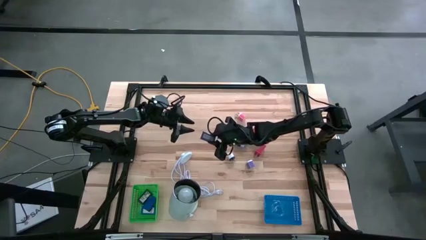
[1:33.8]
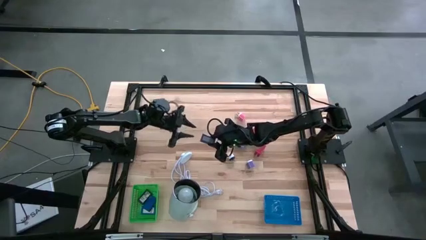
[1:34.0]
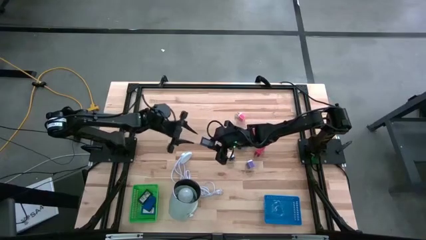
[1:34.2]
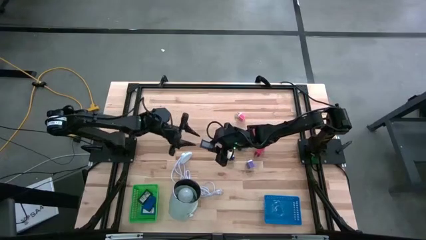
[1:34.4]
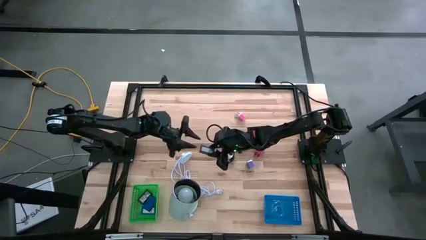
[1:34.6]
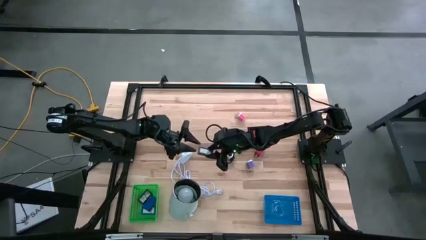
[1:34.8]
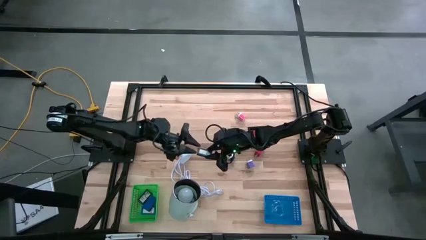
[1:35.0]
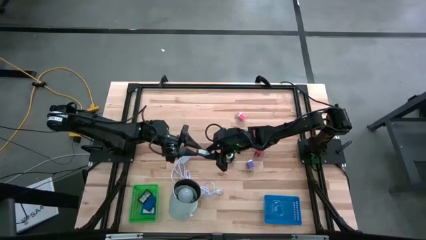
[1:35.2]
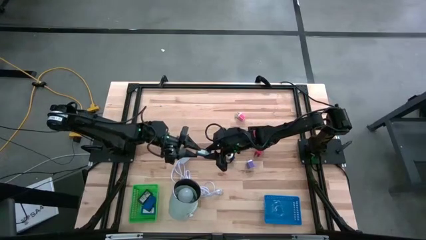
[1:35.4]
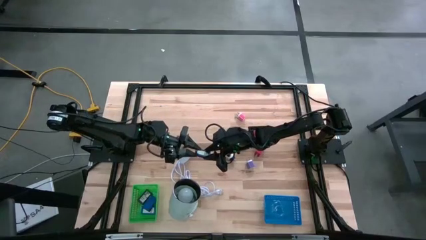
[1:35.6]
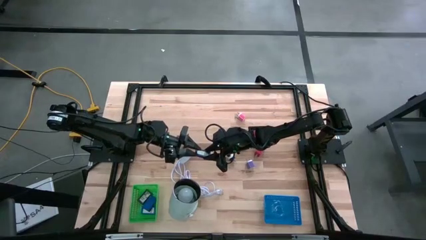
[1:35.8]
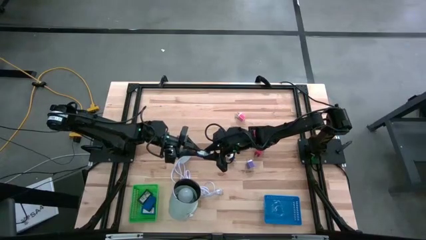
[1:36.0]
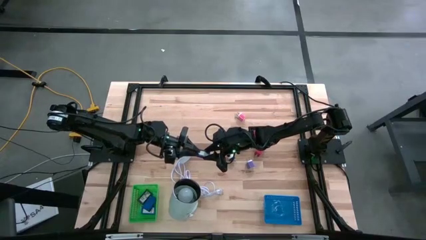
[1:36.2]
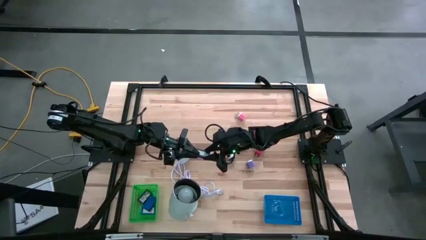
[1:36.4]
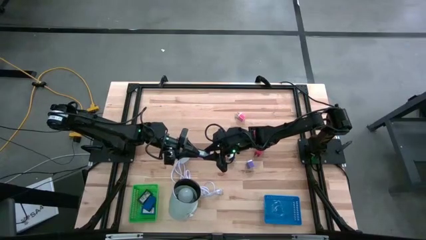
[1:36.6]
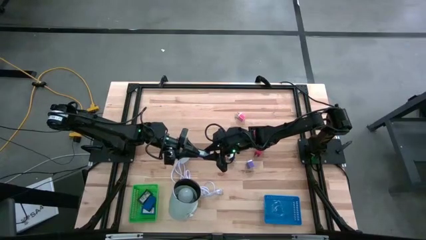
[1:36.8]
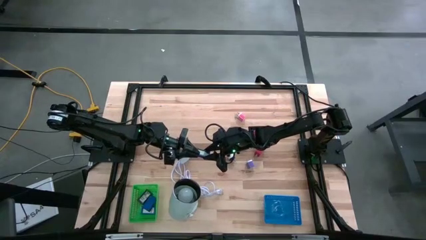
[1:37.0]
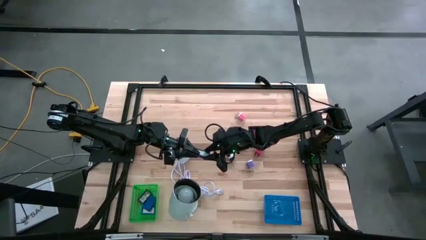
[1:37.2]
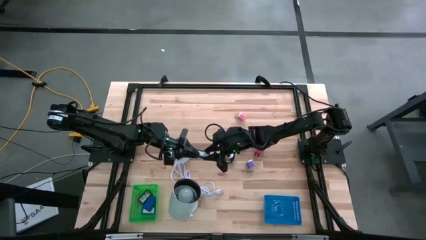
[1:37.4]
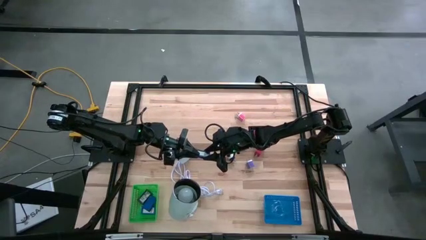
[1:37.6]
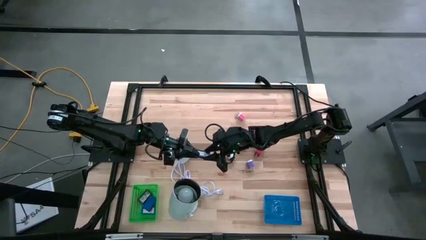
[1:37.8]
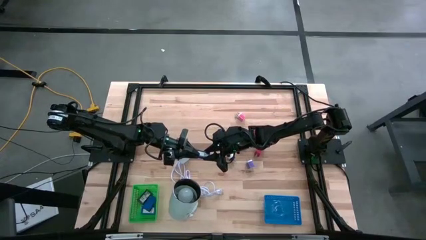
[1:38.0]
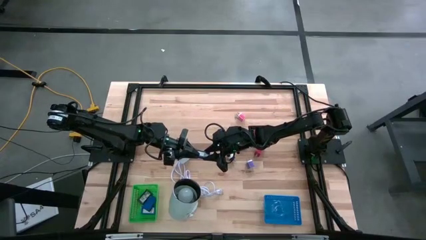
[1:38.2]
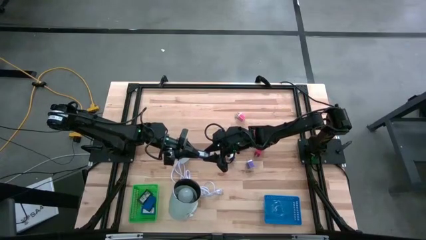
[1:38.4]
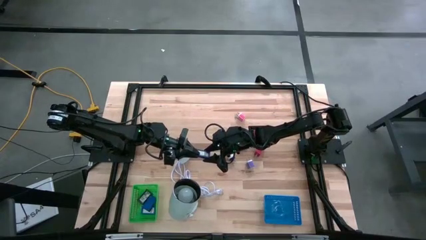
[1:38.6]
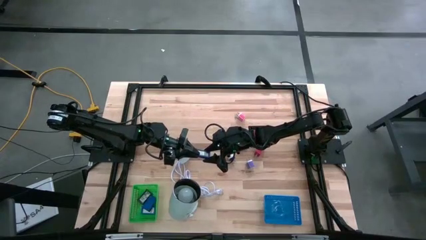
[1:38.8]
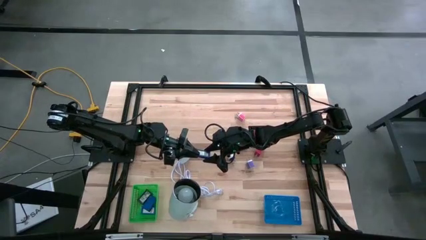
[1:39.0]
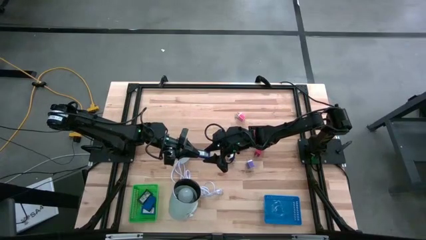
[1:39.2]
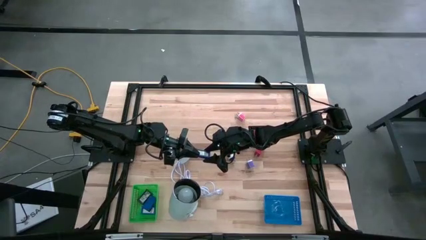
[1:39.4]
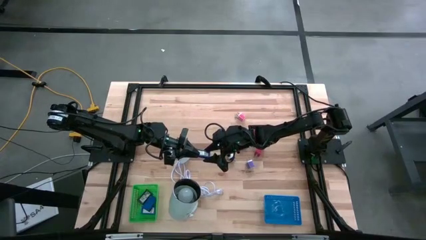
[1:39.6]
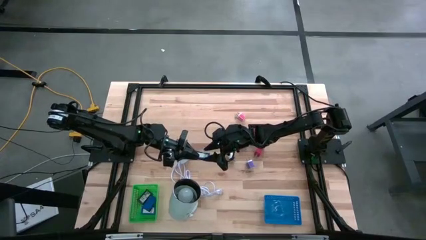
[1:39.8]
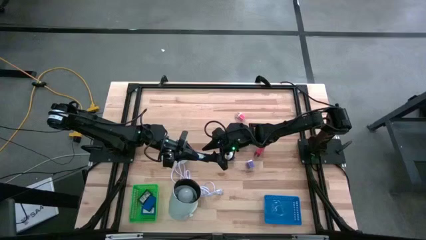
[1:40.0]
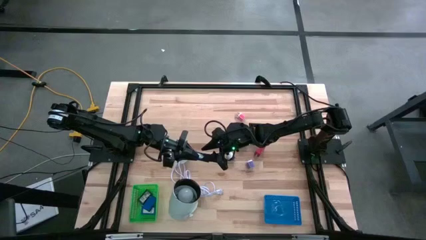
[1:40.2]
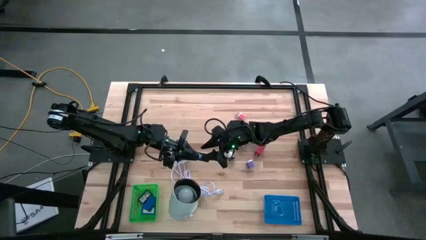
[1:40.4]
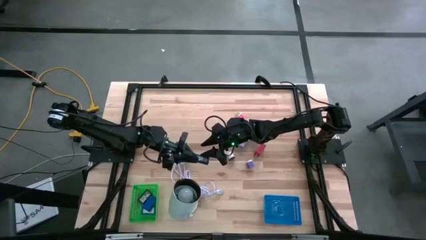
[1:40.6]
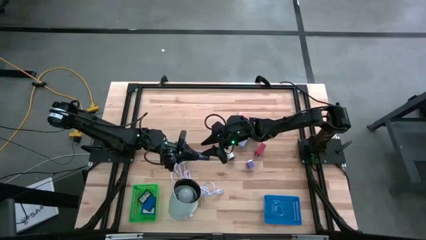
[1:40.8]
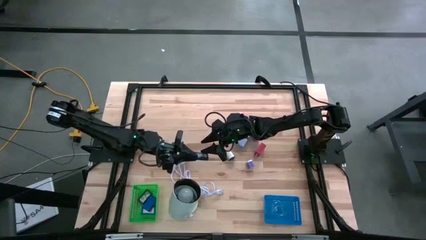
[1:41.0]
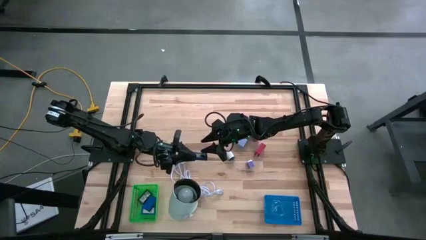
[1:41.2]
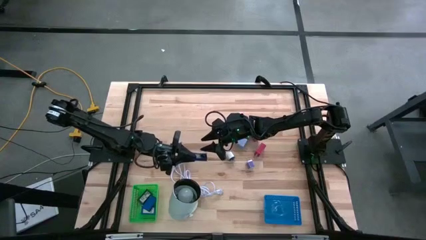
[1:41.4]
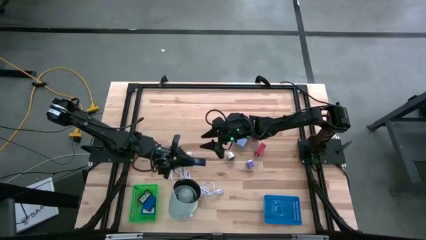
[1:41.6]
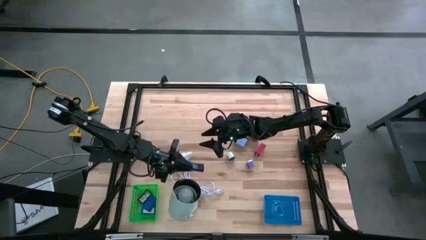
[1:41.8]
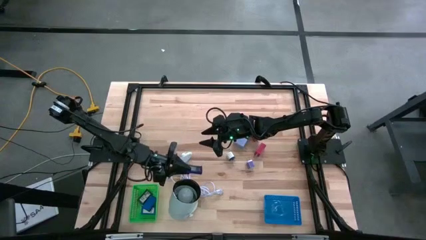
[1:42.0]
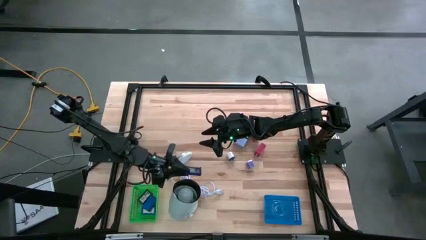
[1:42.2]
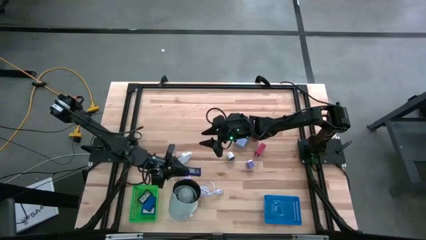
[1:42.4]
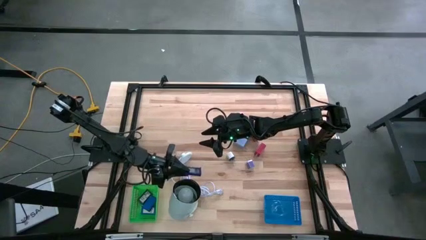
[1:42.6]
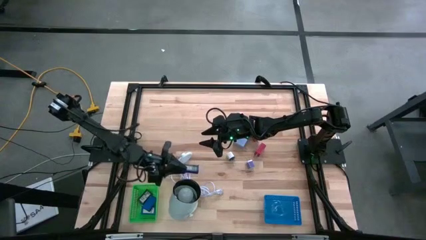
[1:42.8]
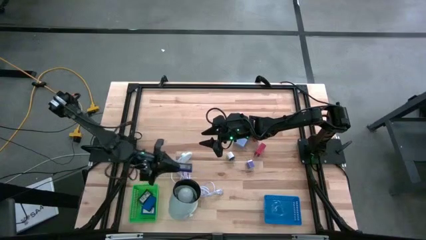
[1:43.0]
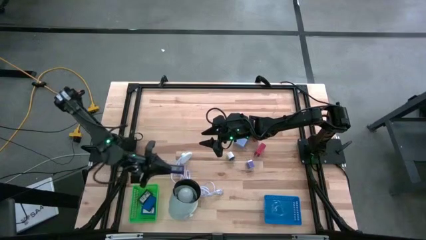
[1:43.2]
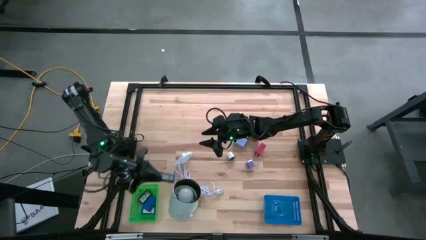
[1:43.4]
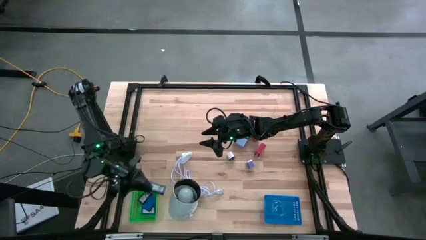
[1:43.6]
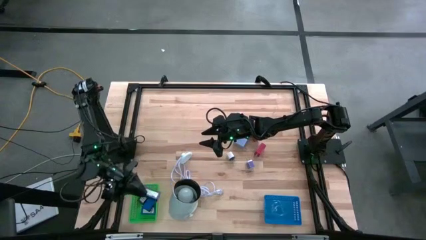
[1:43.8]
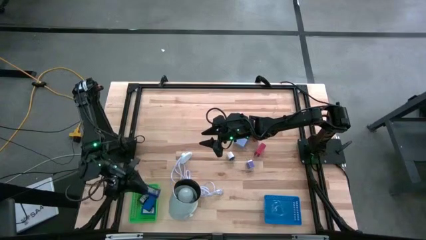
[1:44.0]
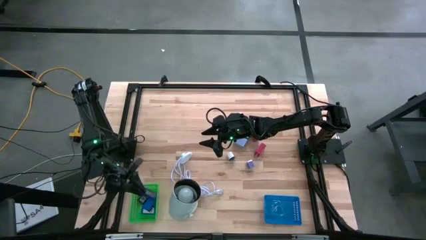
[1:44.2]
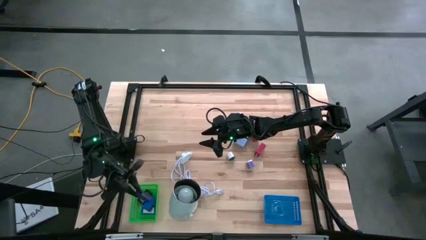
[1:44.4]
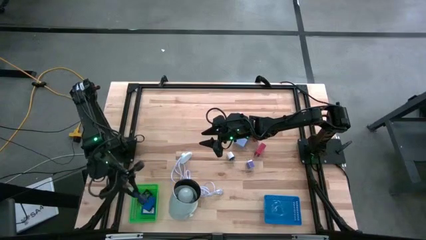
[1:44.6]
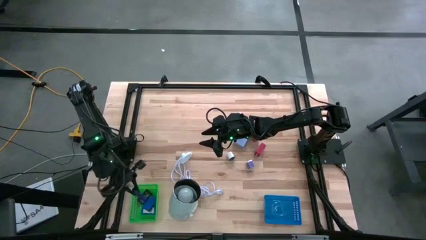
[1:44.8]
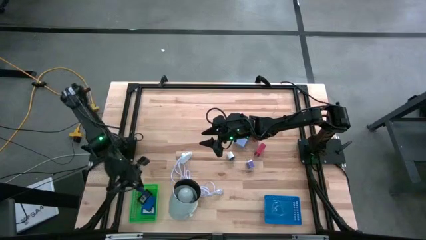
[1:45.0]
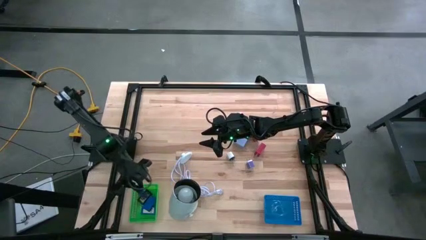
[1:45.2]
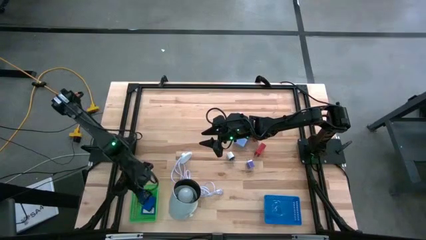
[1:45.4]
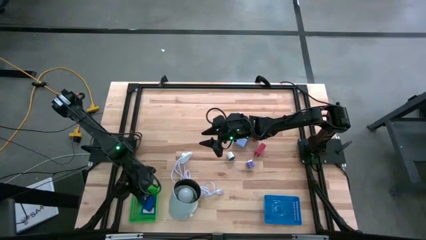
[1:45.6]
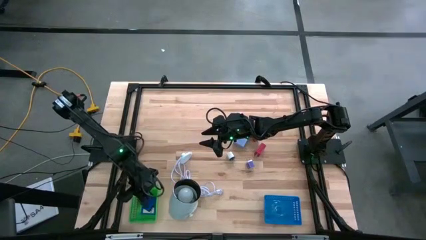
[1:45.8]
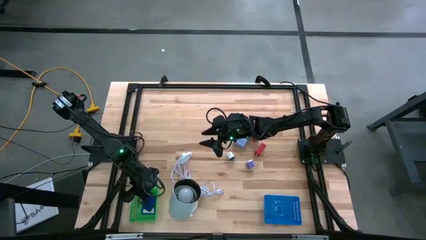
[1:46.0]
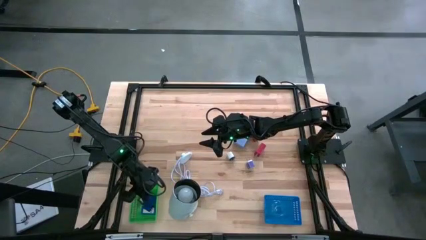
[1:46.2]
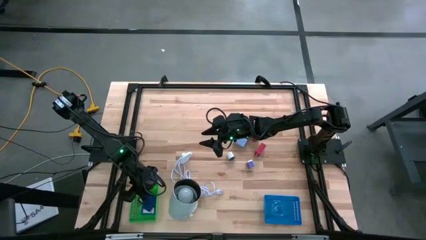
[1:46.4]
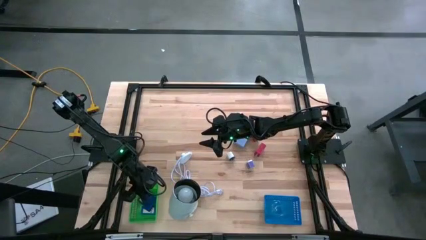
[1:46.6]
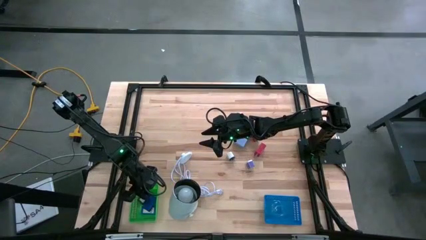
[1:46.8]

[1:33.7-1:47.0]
Task: Pick & Place Office items
Put the dark blue digital timer into the green basket

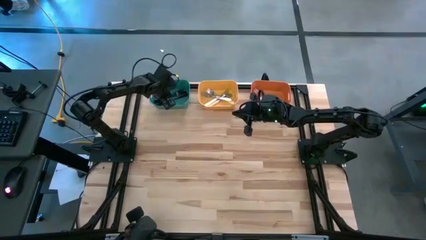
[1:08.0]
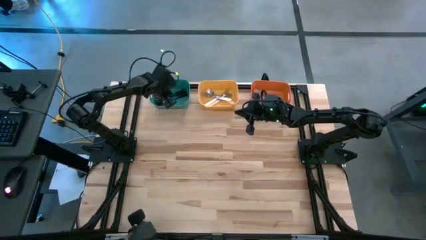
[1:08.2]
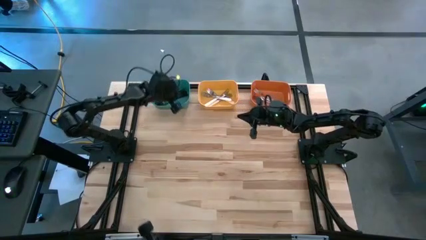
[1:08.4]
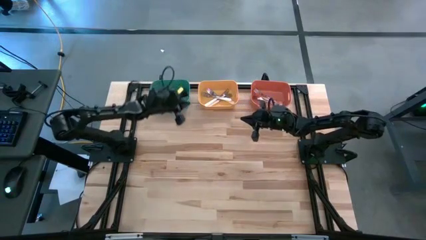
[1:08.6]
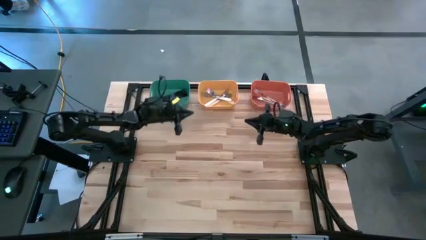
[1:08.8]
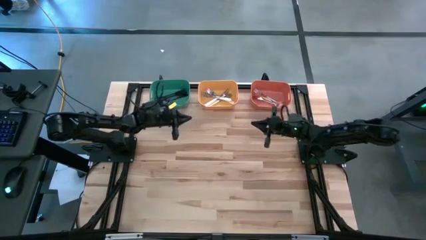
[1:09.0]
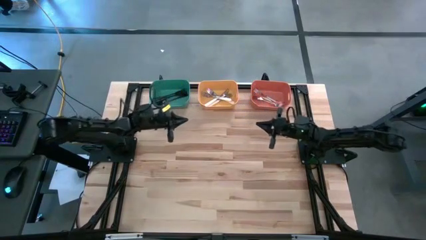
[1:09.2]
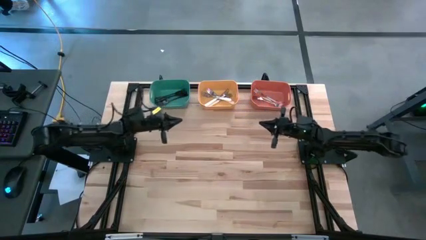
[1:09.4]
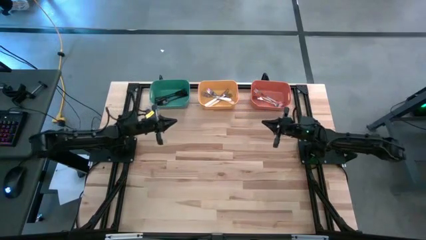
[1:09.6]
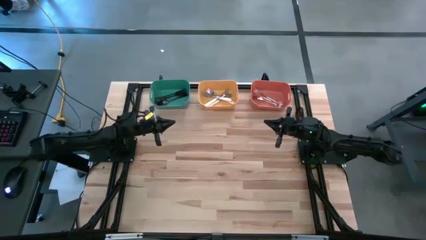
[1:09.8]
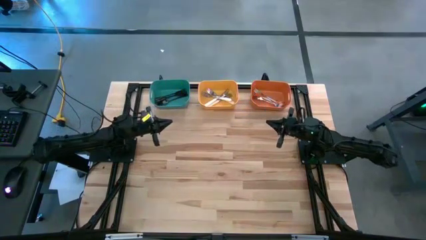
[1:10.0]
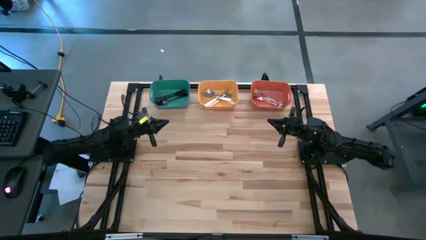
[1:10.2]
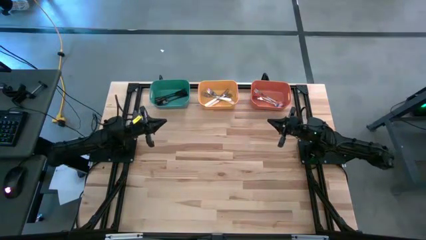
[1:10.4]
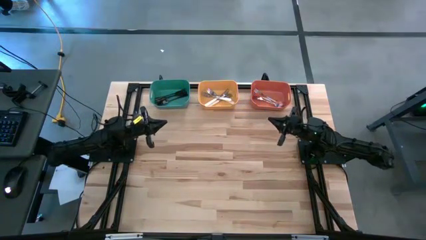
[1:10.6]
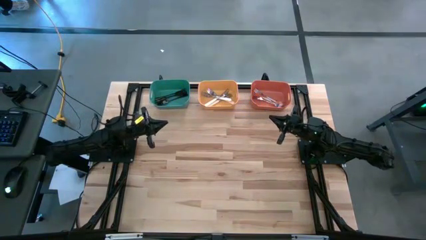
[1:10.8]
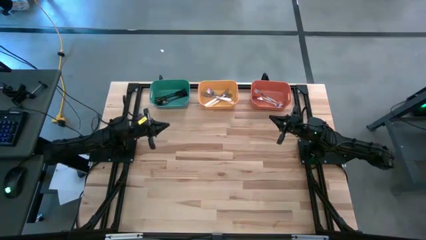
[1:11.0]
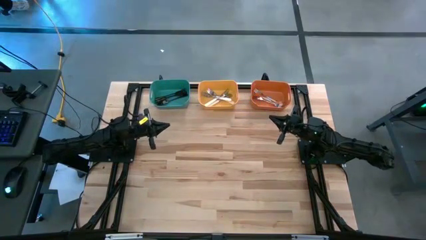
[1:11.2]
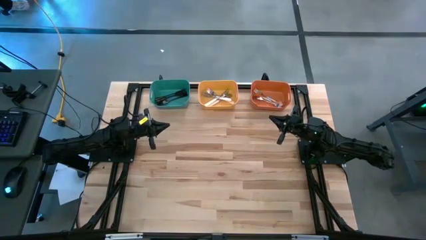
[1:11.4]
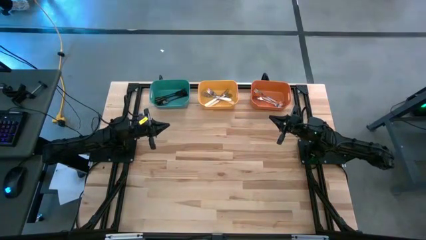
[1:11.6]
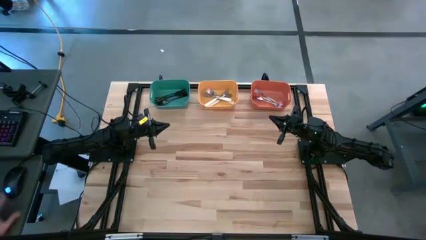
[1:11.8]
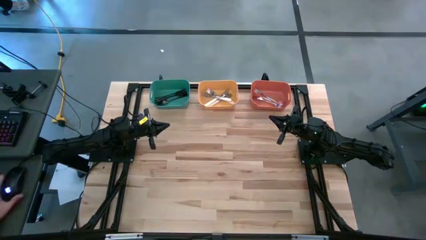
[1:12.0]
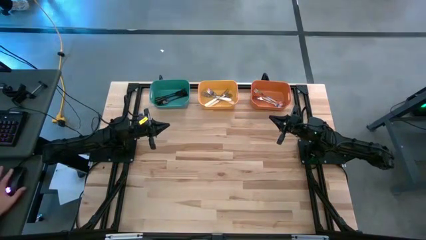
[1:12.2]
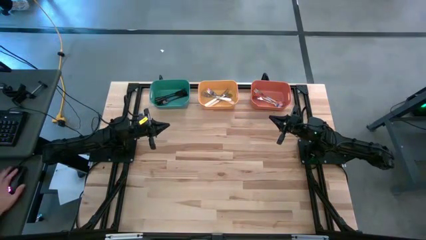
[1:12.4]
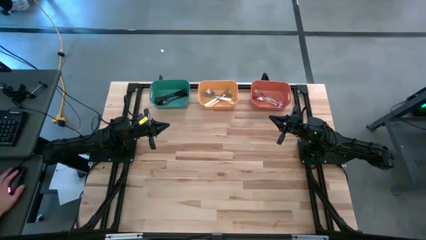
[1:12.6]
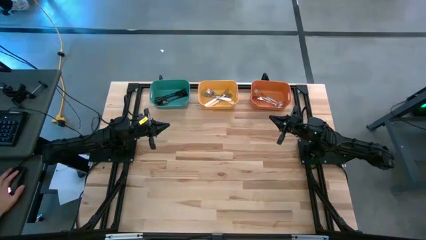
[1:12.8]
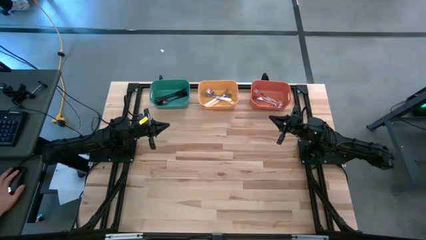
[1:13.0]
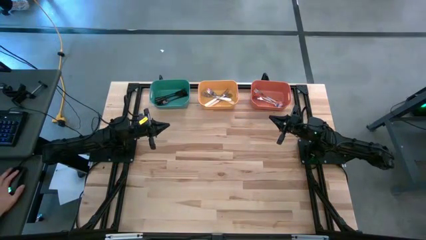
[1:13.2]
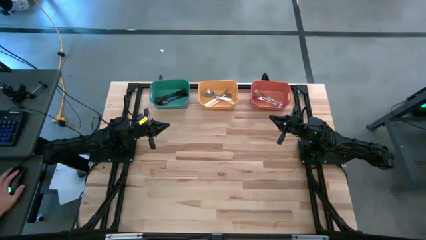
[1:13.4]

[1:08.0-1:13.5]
Task: Sort silverware by color (type)
Return to Home Position
